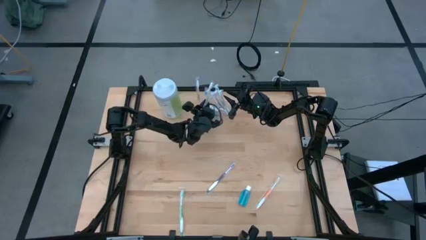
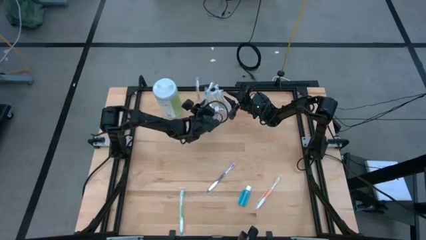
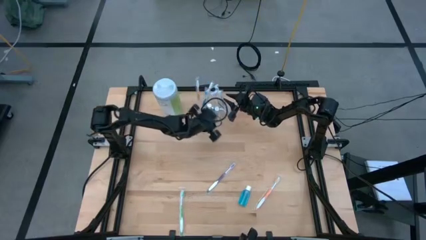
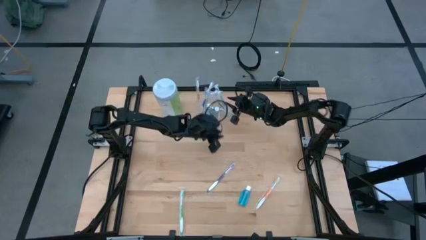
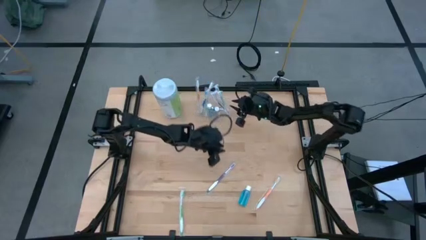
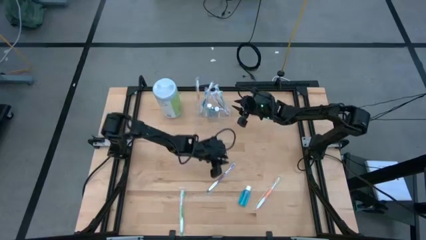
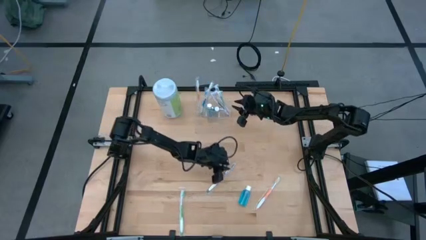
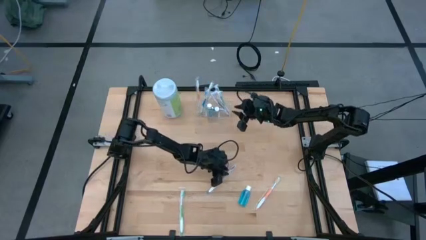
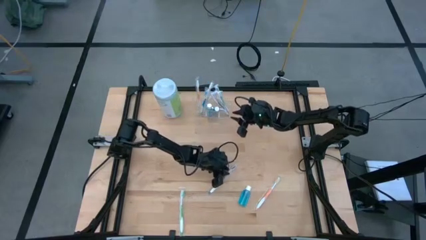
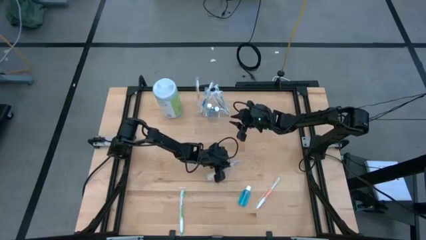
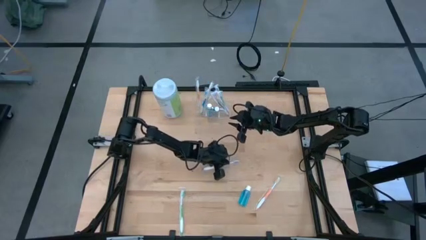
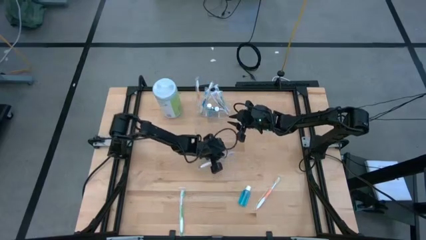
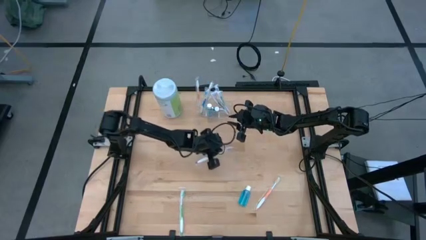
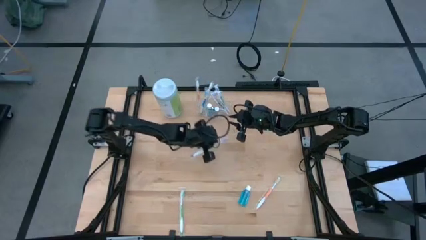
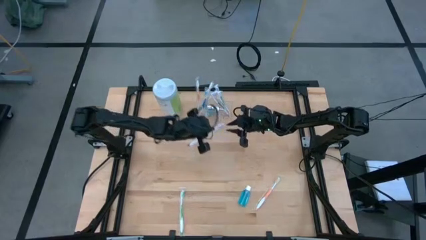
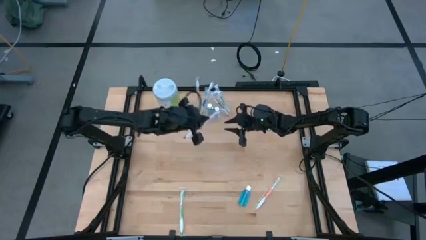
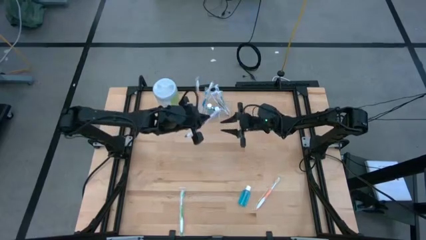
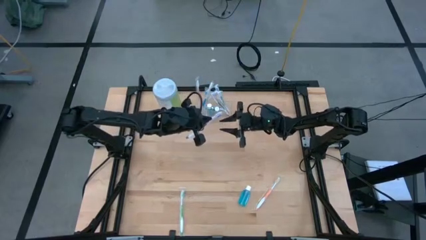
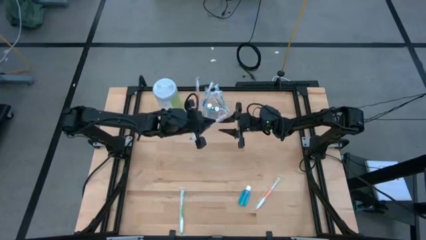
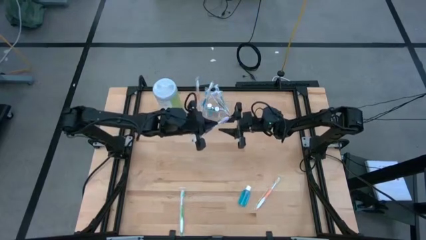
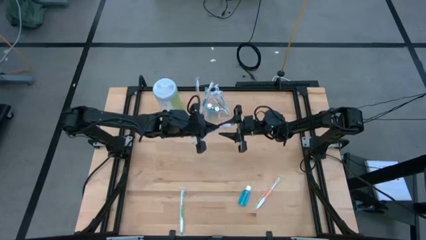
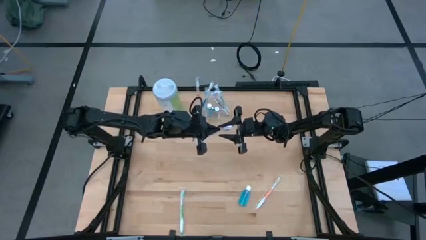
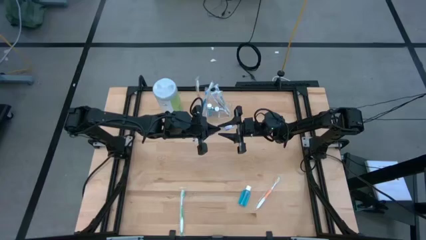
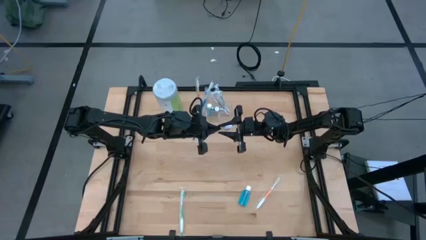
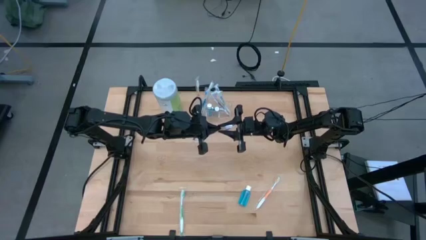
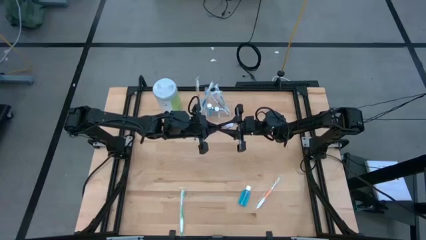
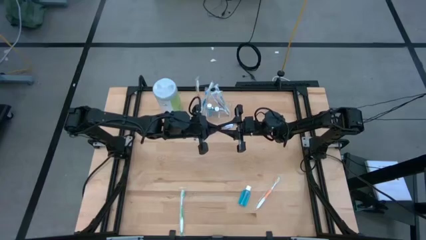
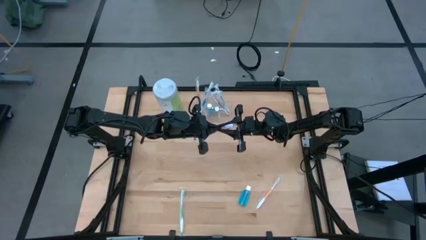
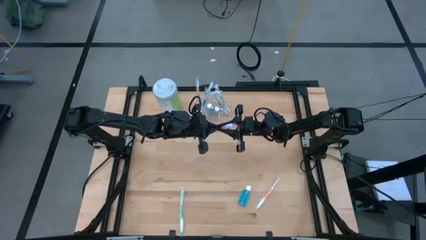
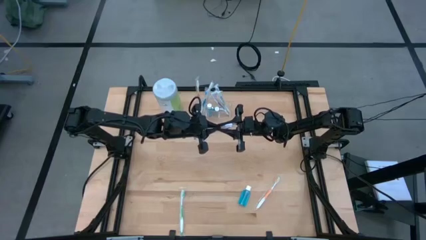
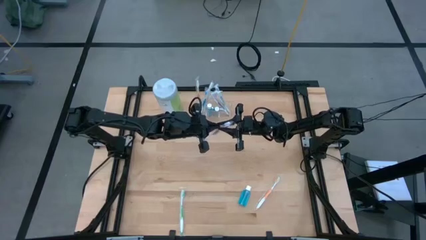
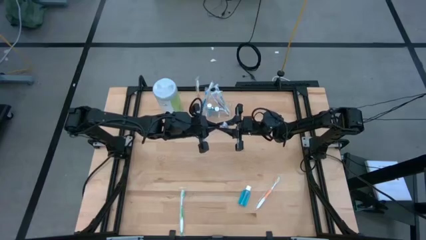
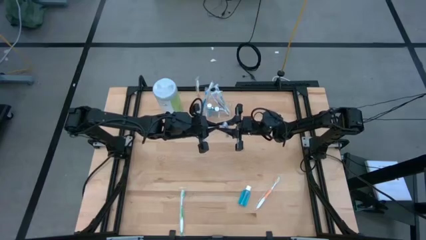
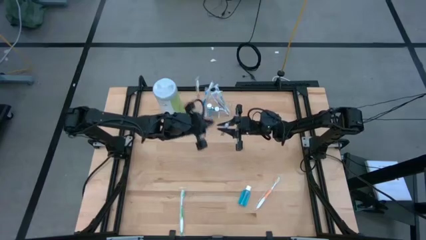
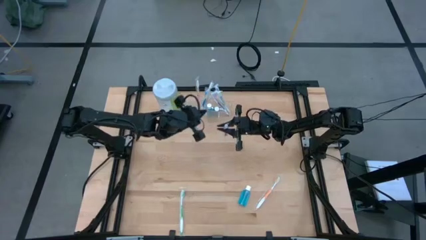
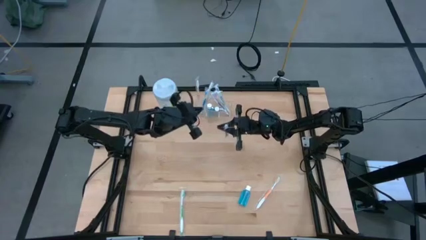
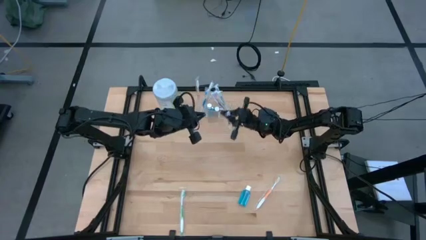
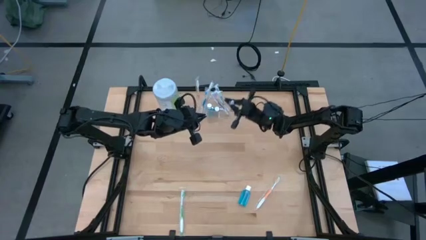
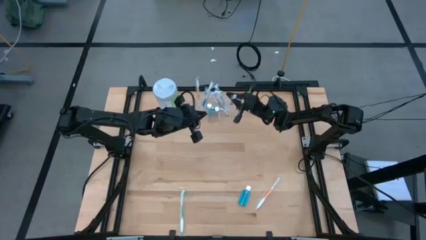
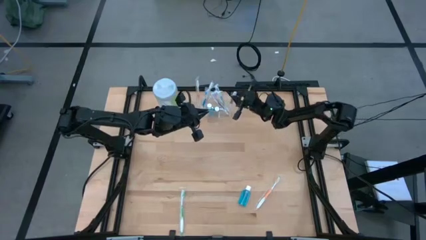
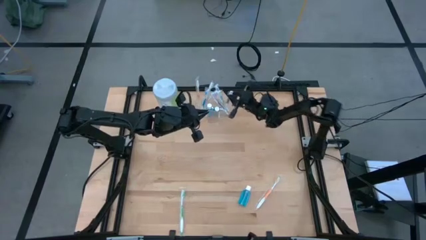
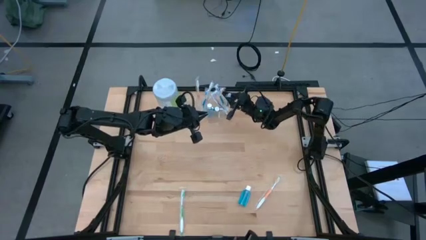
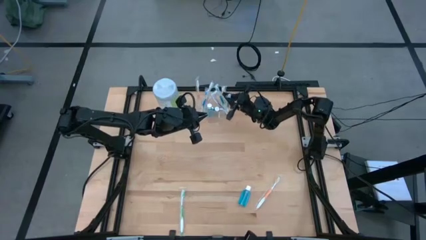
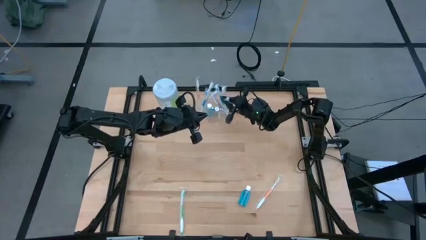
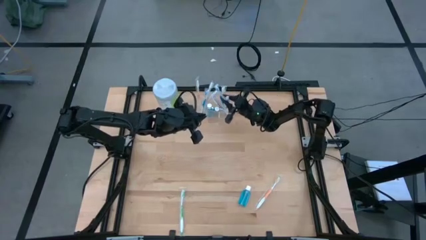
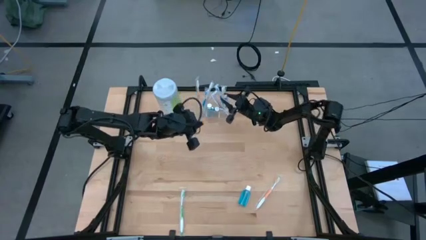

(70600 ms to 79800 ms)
Task: Pick & Place toothbrushing station
Put the purple toothbrush into the transparent organizer

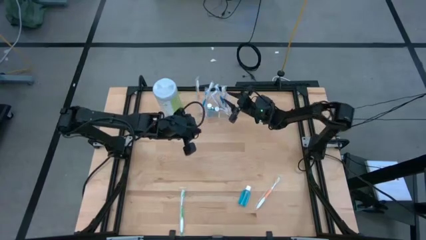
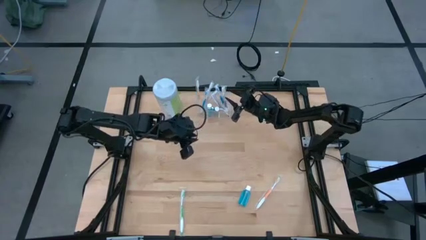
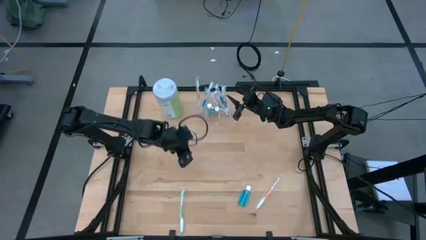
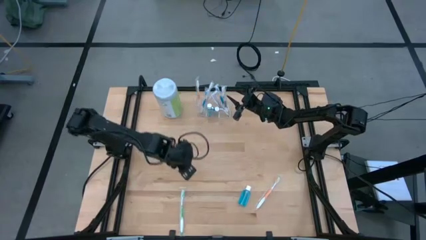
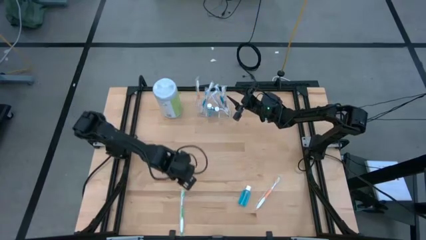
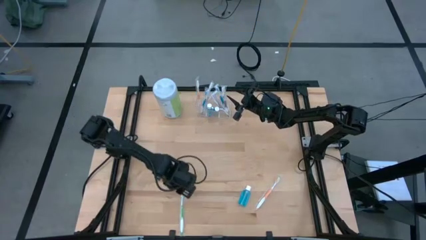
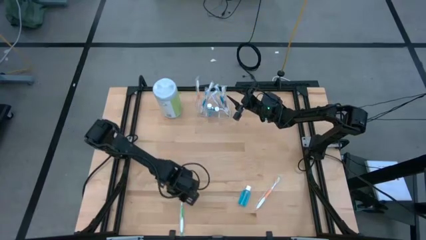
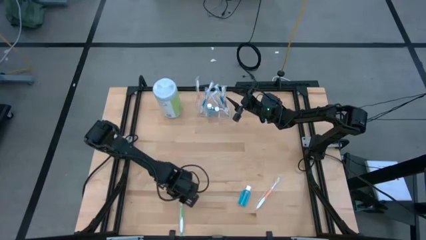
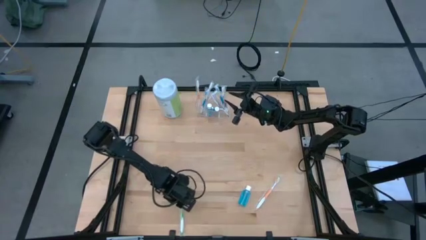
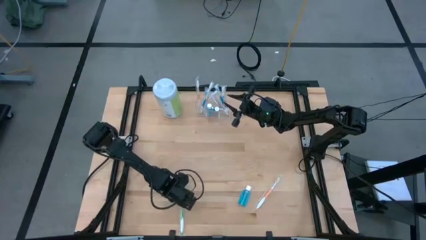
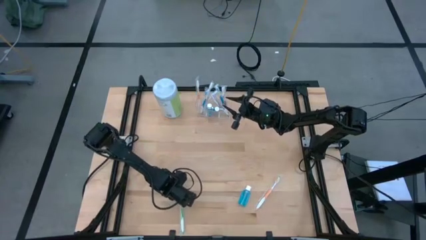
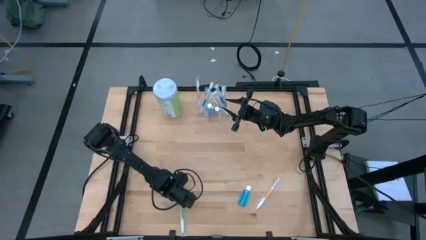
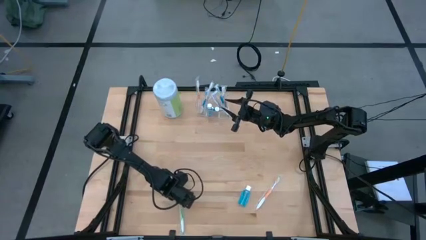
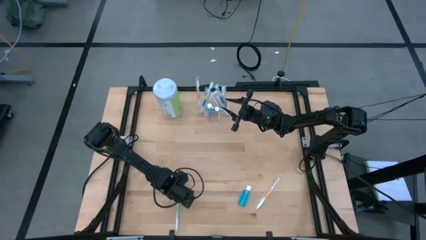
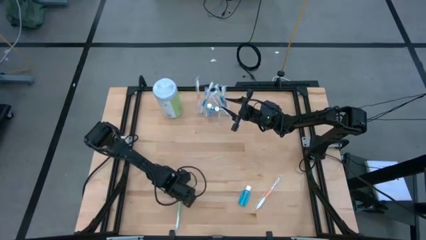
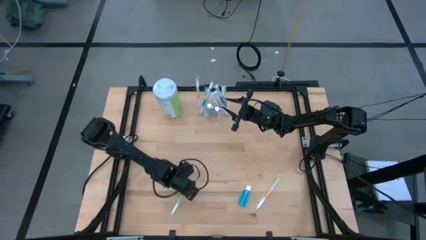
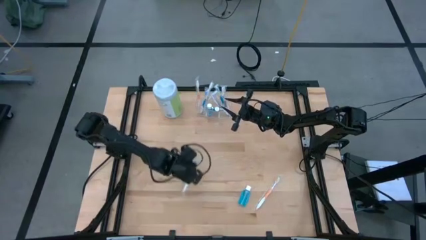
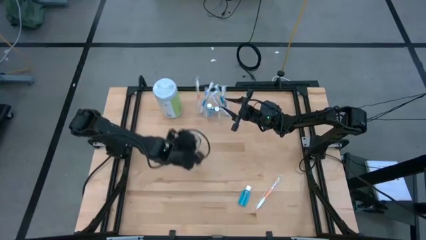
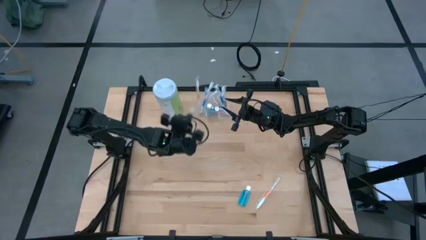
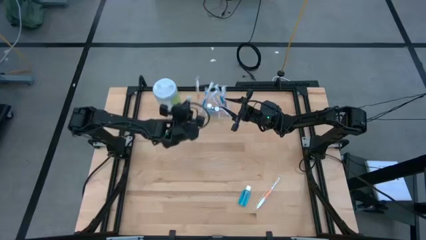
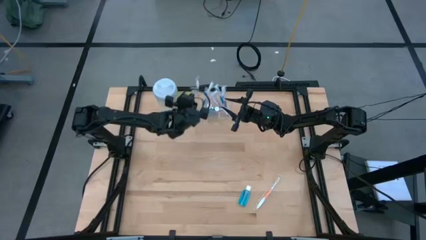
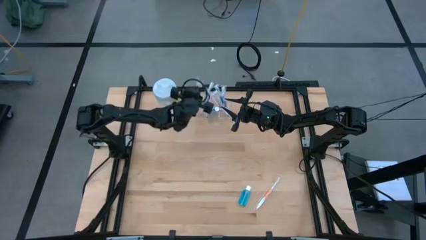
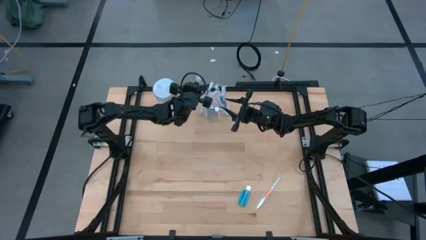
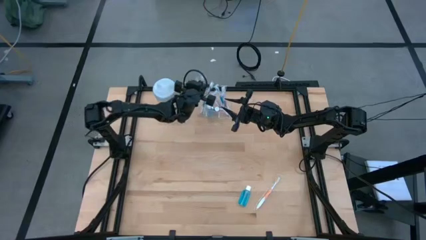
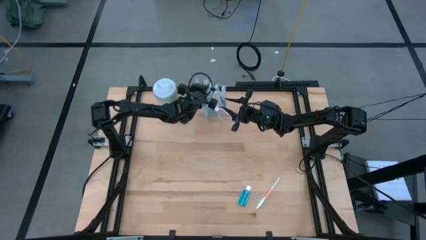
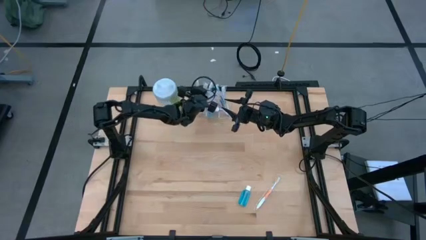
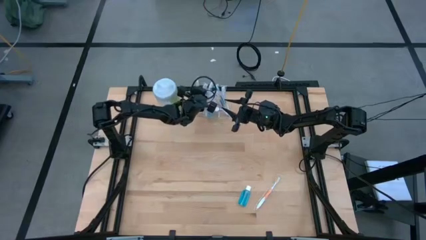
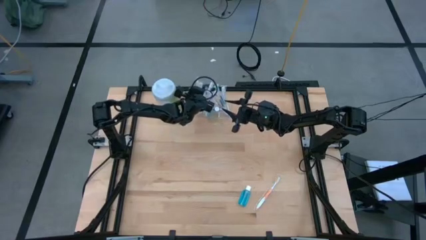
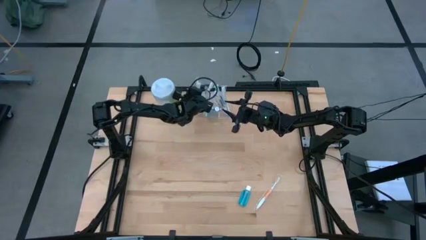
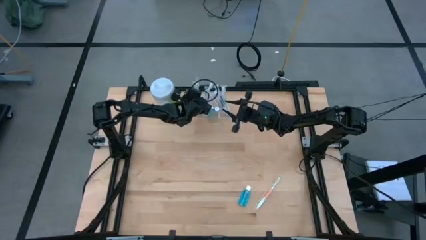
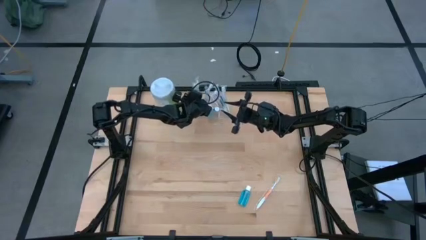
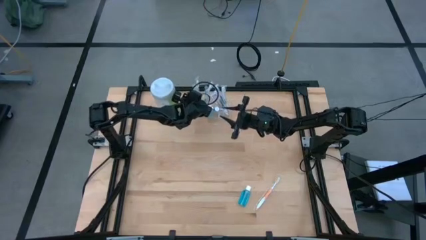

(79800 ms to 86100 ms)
Put the green toothbrush into the transparent organizer

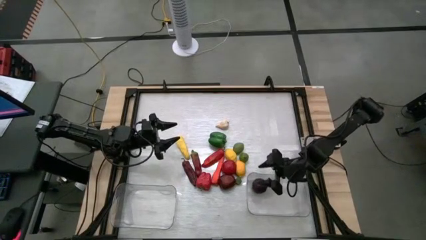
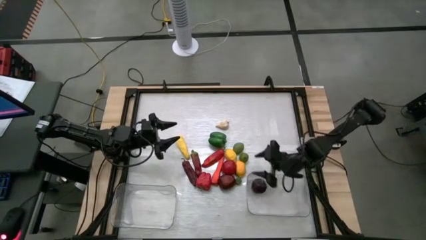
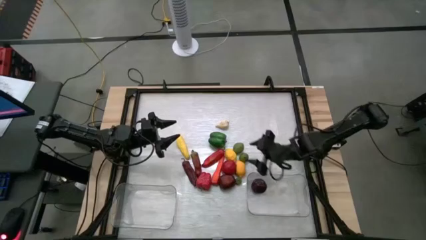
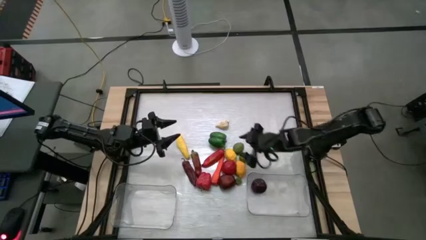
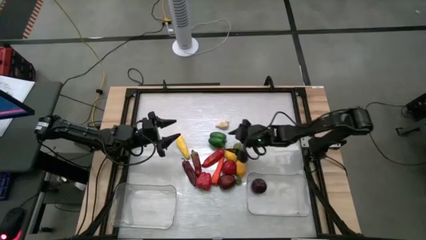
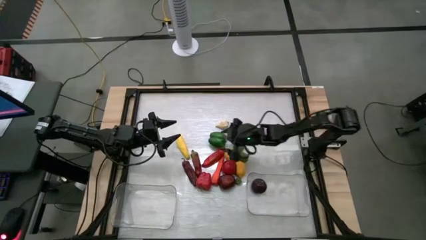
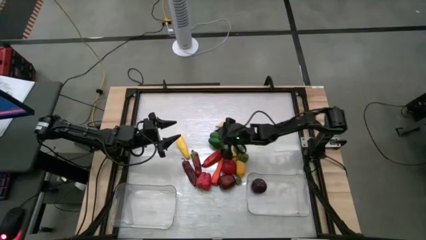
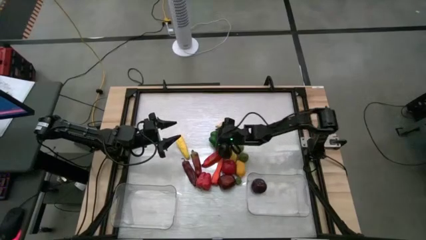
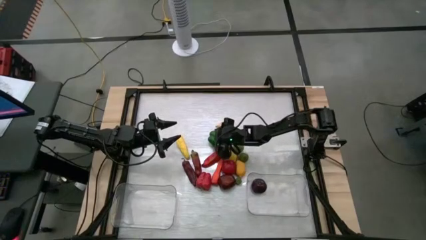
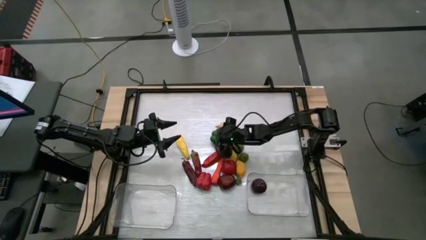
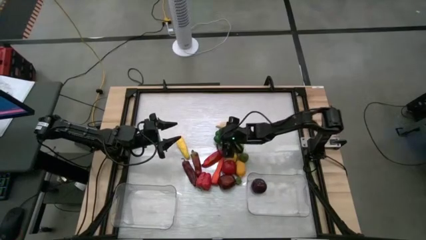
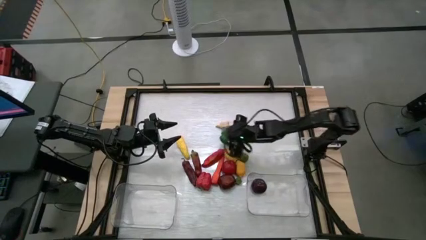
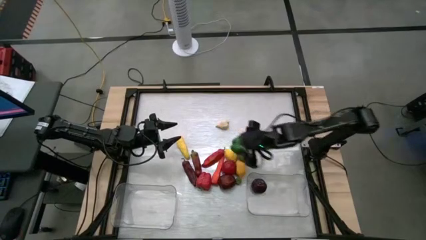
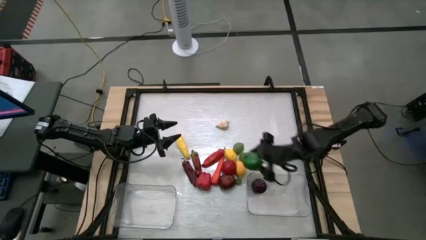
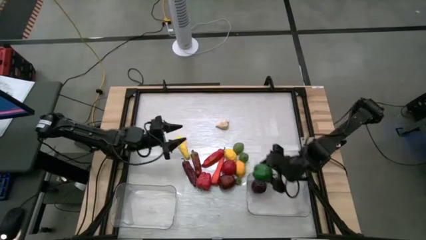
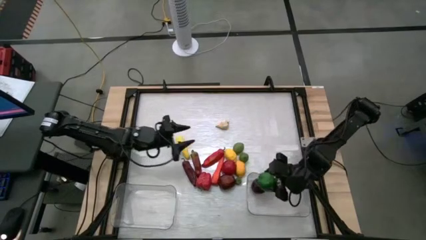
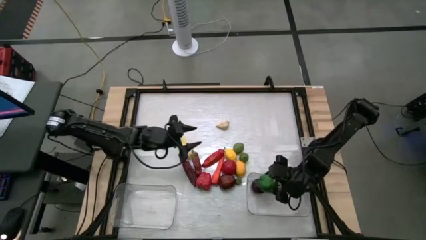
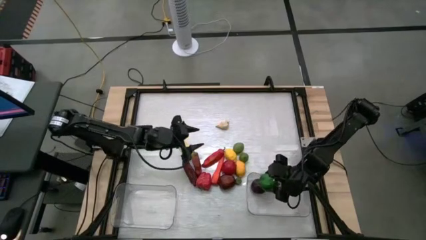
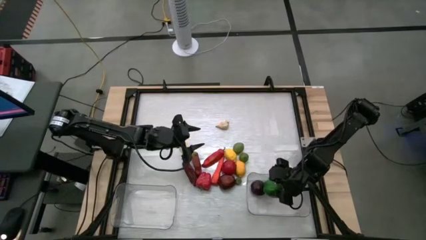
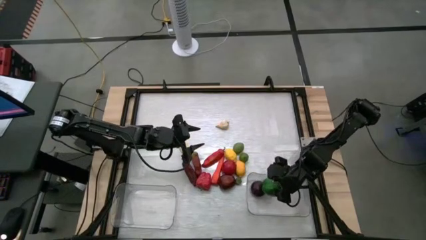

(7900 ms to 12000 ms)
Task: Sort produce into baskets
Put the green bell pepper into the right transparent bin
